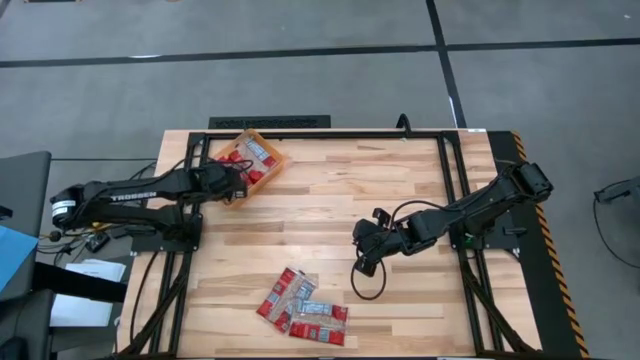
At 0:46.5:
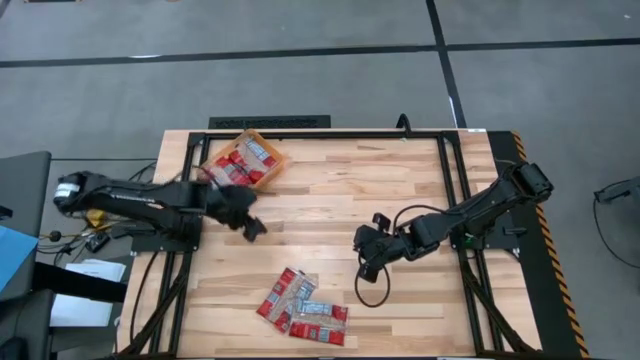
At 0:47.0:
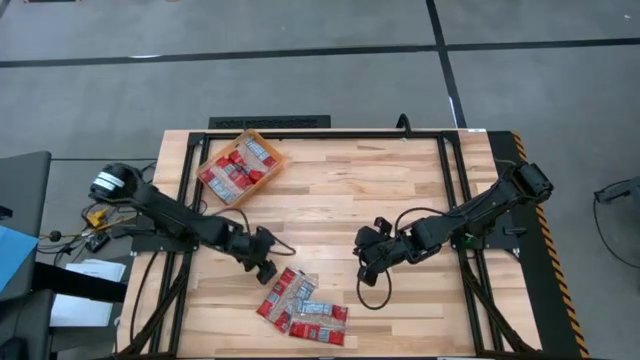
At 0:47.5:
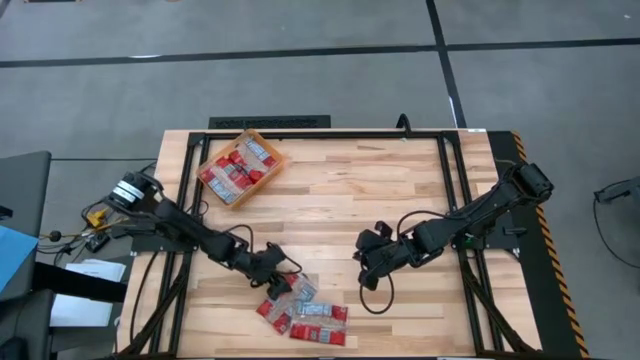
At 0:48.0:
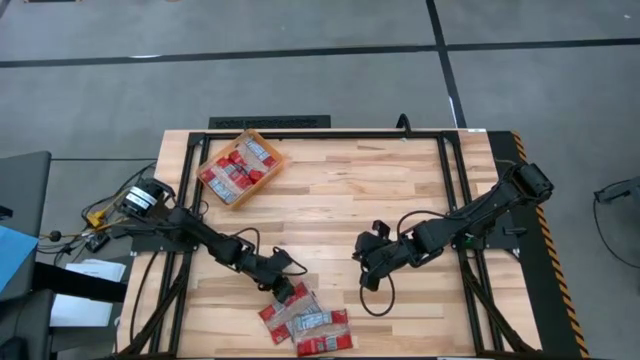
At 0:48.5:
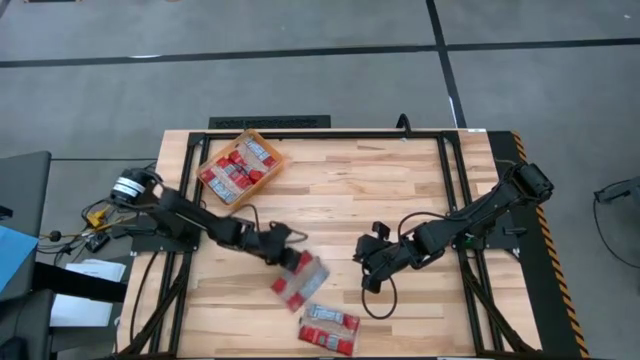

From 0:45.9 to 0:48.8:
Task: Sort popcorn bags into baskets
Put the red popcorn pack into the orange bin

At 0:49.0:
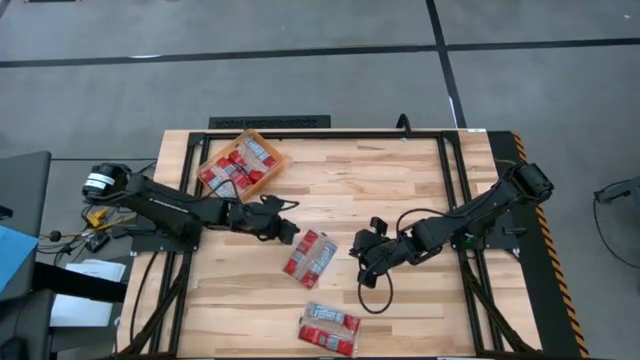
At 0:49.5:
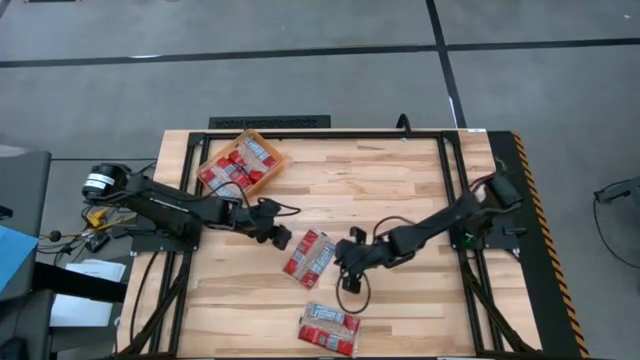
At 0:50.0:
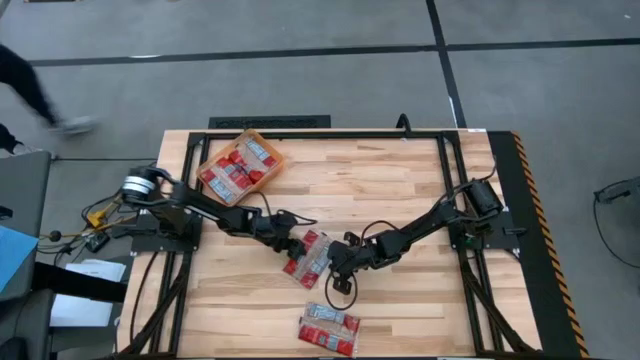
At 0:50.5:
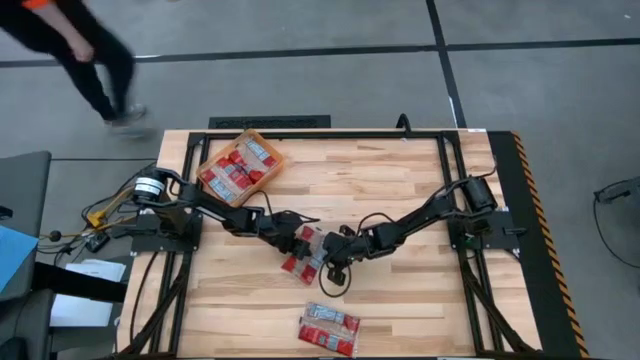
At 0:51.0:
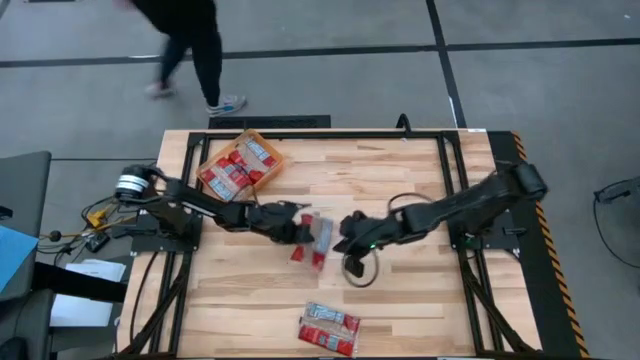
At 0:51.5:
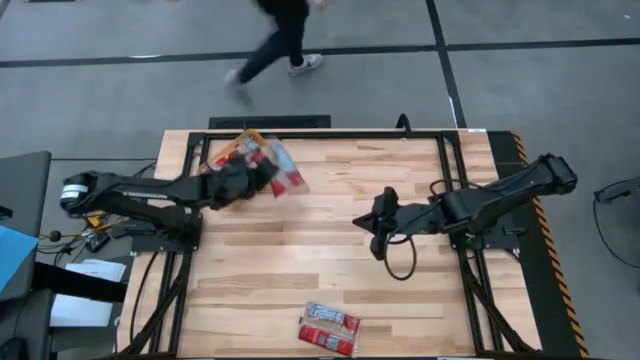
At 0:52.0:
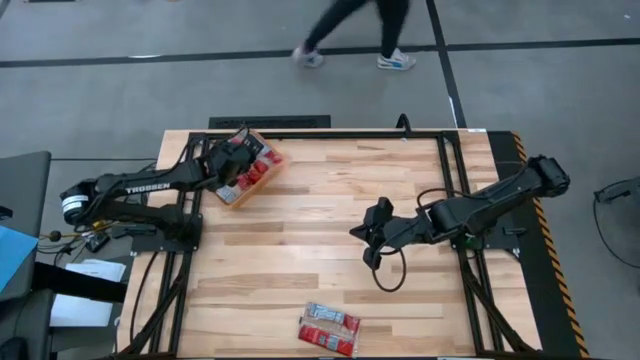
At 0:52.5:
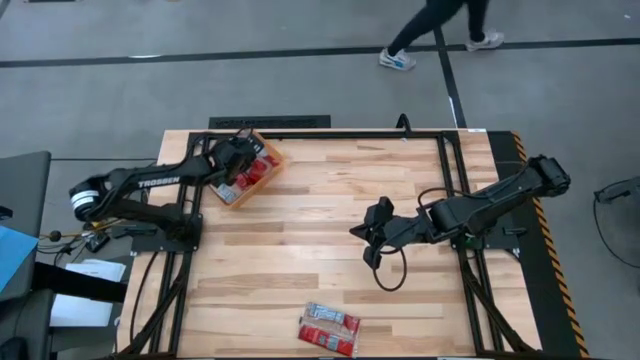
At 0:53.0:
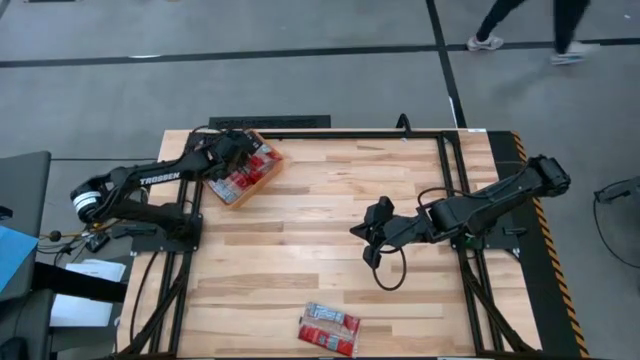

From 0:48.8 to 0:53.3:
Put the red popcorn pack into the orange bin

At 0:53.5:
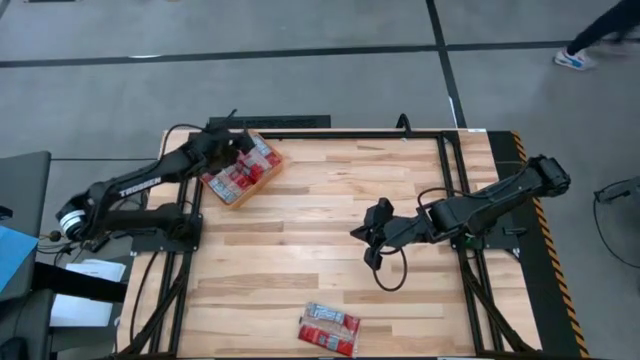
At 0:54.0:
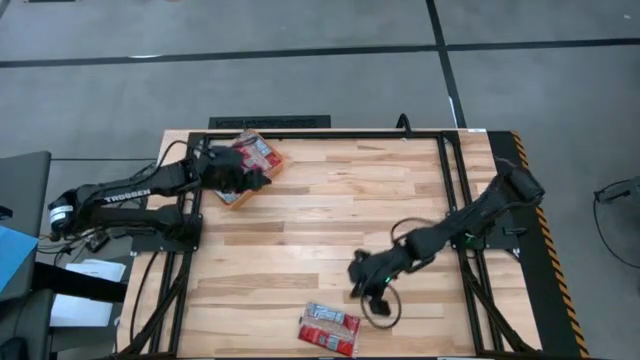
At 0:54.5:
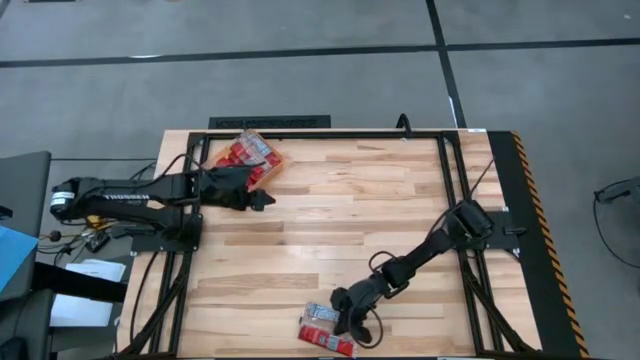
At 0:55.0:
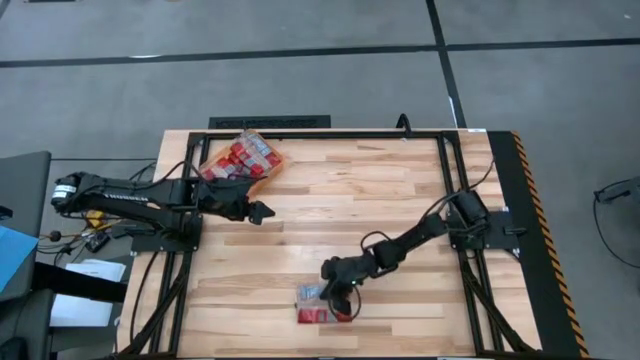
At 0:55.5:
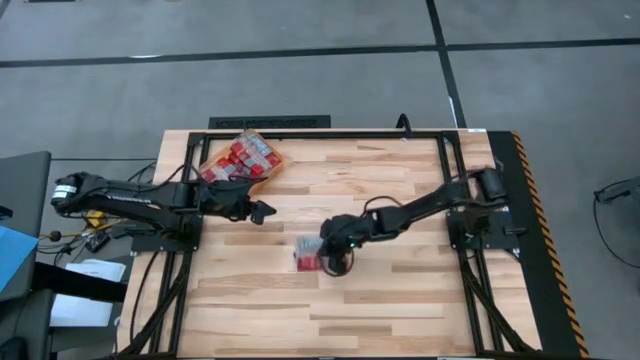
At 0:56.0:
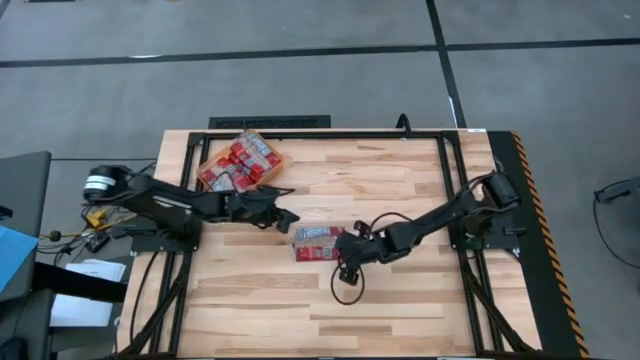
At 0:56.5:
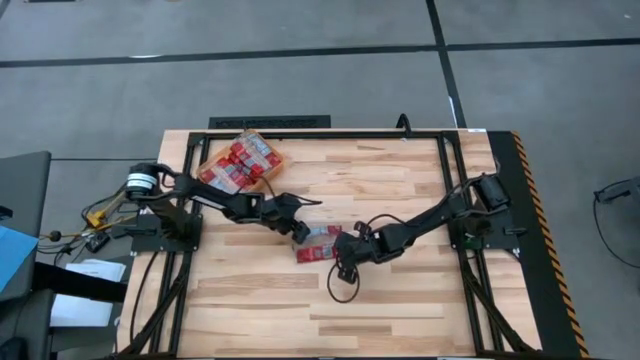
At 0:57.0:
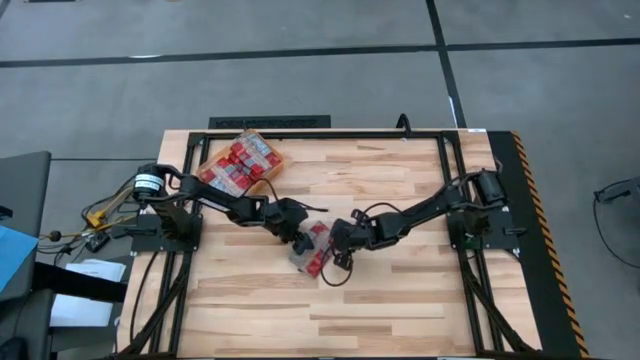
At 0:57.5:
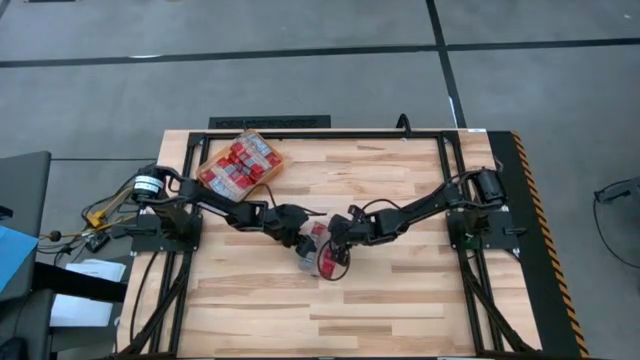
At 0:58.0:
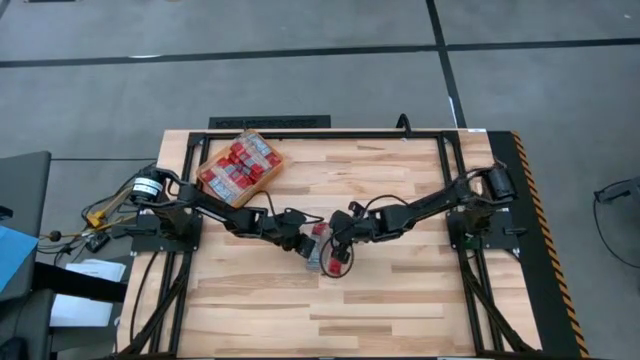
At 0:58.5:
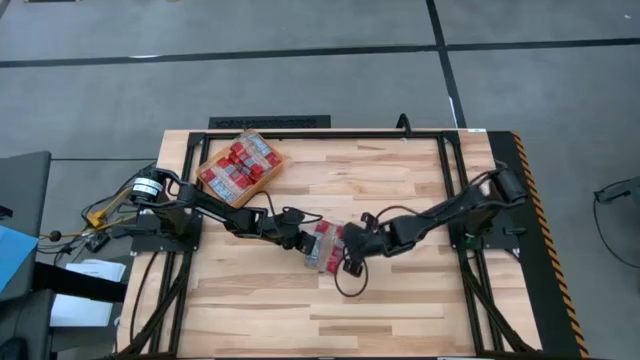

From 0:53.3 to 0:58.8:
Put the red popcorn pack into the orange bin

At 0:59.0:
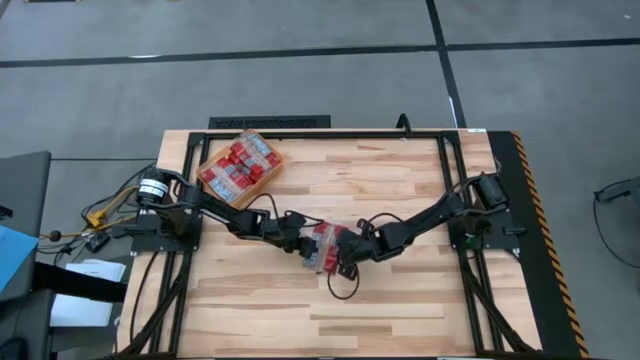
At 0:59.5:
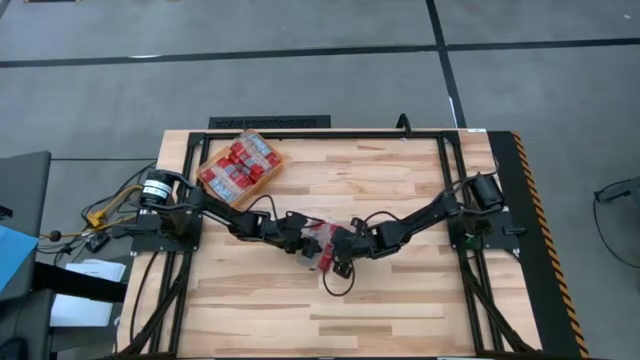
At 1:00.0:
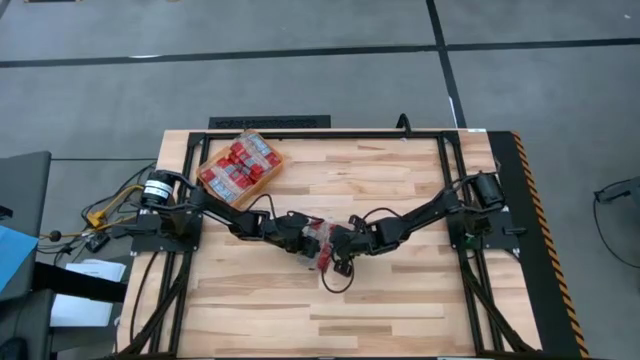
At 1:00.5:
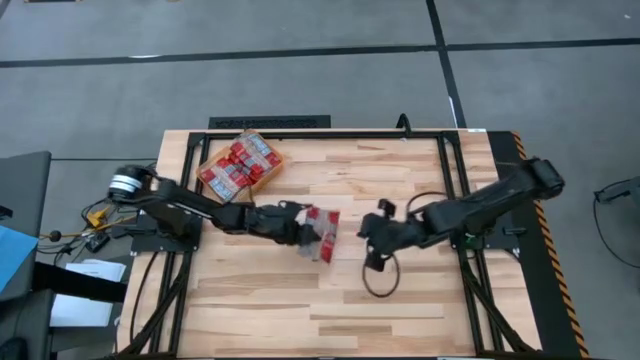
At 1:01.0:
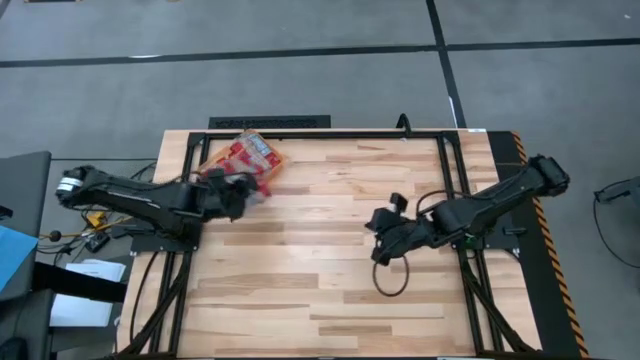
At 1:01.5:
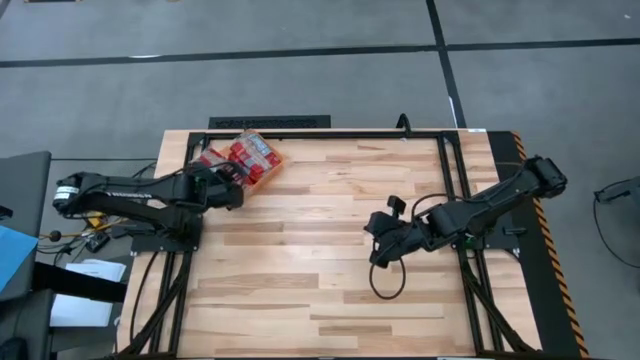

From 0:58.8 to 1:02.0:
Put the red popcorn pack into the orange bin

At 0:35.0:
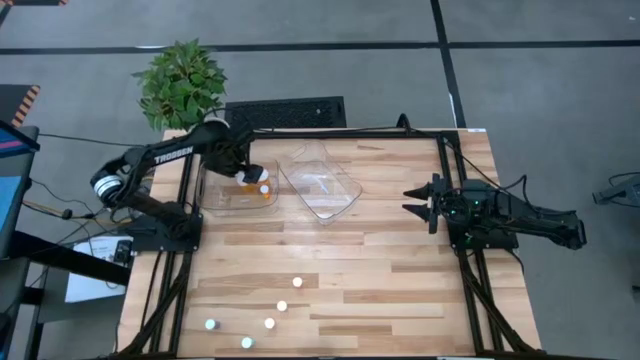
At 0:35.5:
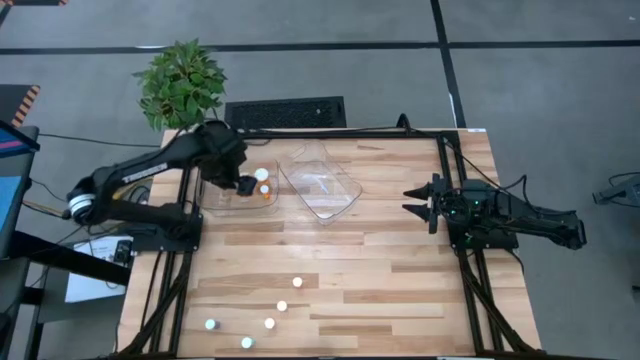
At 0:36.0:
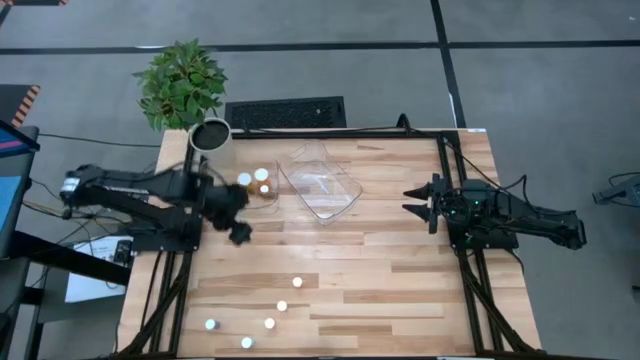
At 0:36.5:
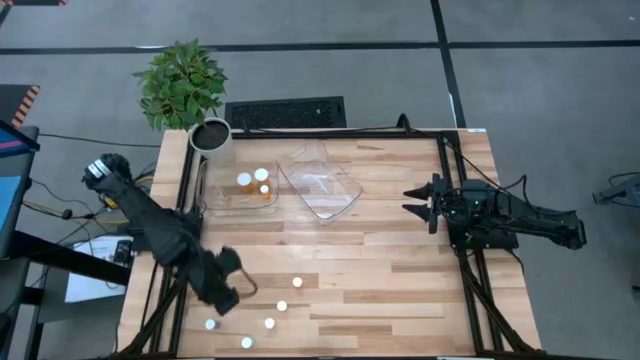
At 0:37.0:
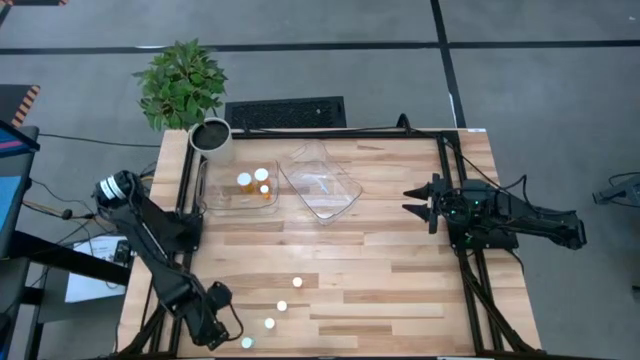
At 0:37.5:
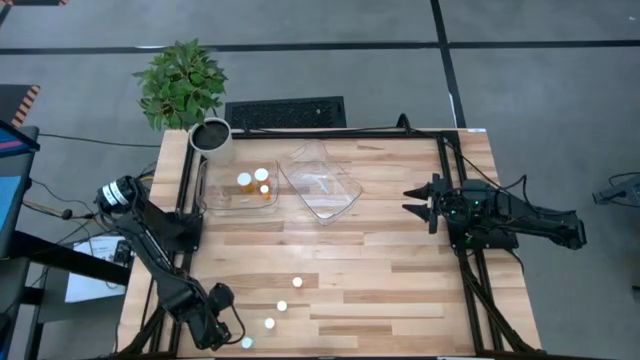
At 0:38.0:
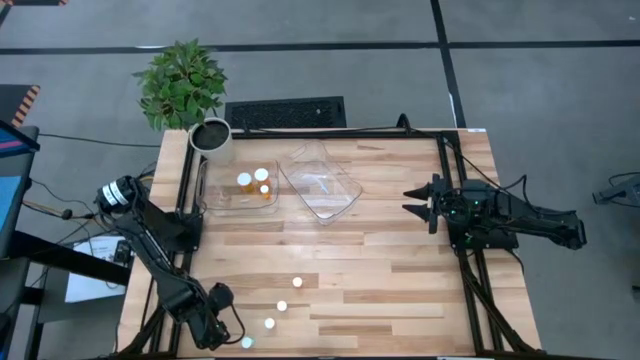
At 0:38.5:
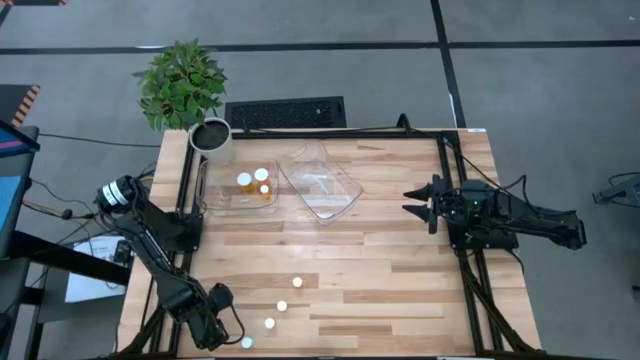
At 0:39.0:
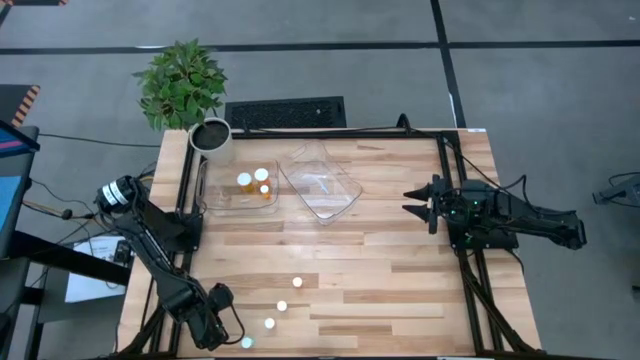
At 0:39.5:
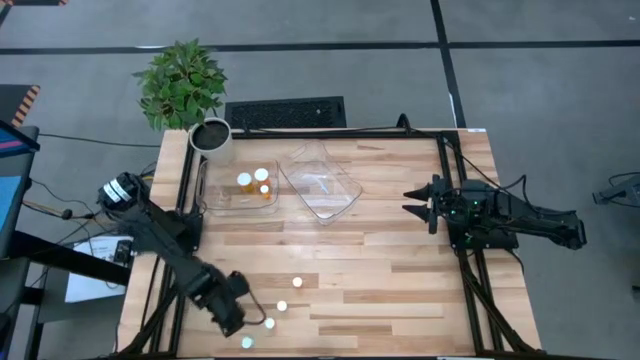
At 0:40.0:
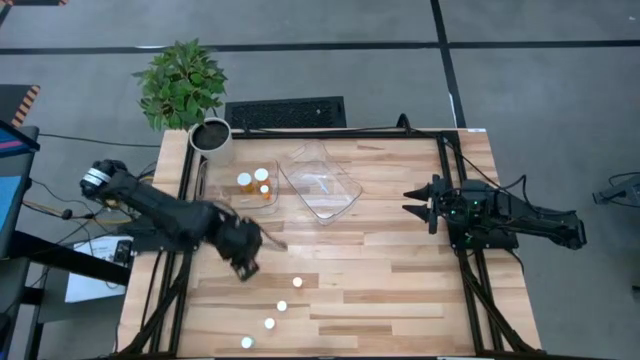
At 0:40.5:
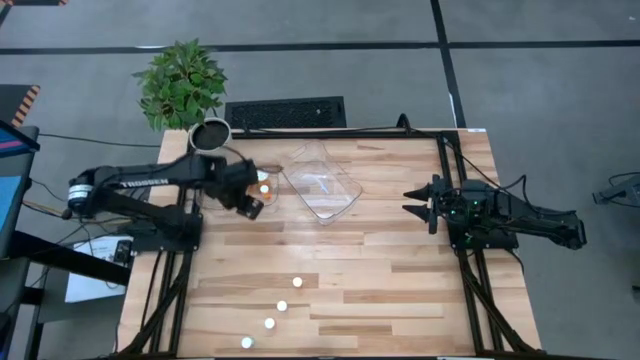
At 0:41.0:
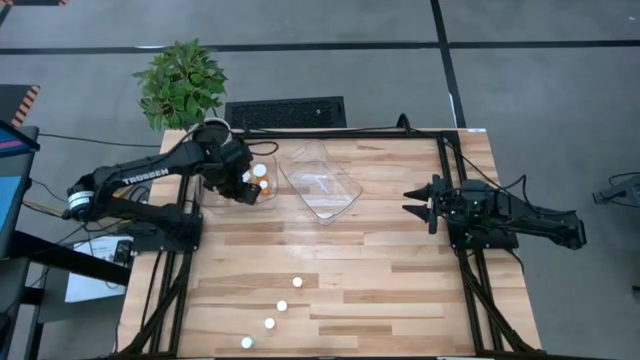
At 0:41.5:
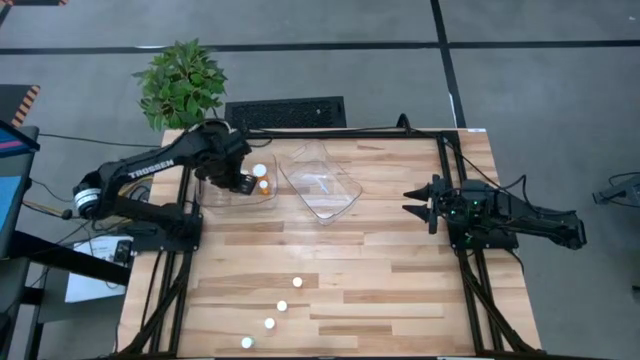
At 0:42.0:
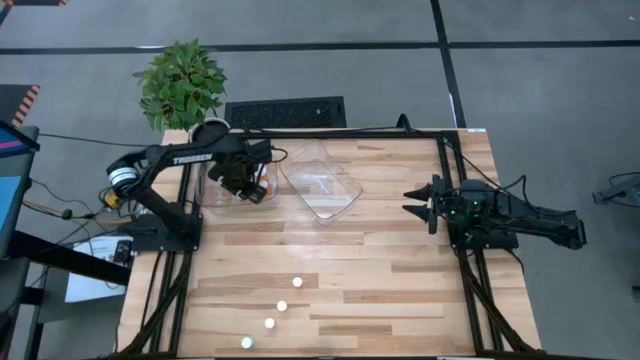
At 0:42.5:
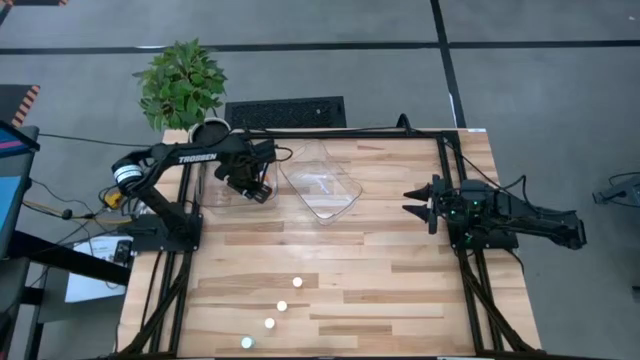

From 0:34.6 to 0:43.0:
Task: Pick and place medicine bottles into bin by pill shape (circle, oval)
Put the small blue capsule bottle into the left transparent bin
